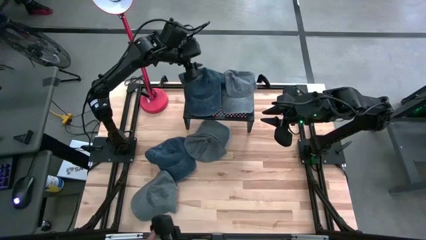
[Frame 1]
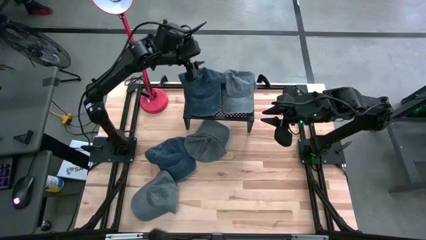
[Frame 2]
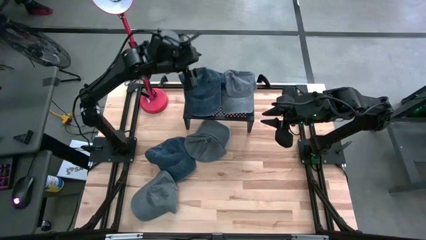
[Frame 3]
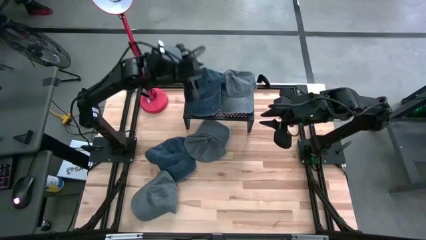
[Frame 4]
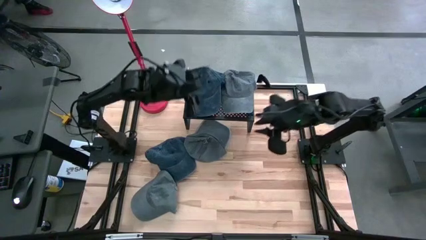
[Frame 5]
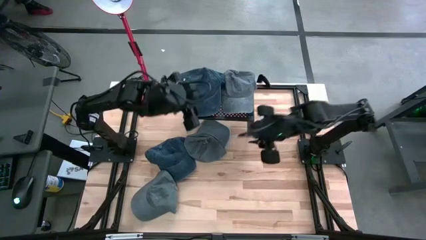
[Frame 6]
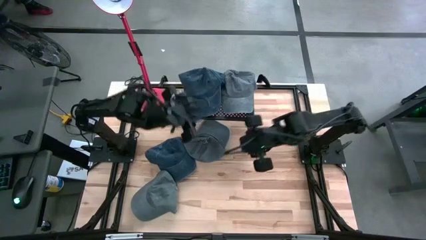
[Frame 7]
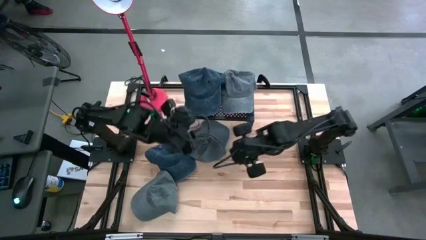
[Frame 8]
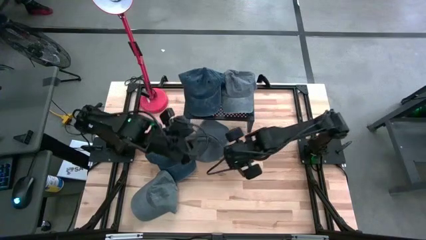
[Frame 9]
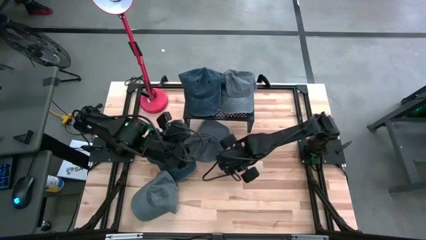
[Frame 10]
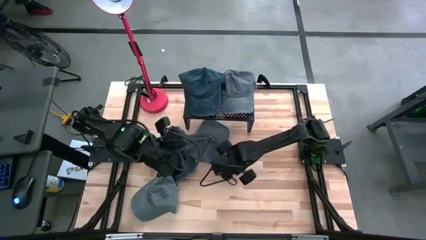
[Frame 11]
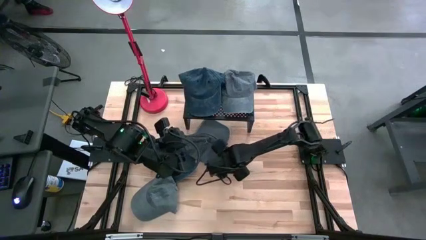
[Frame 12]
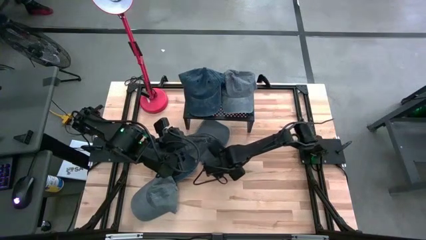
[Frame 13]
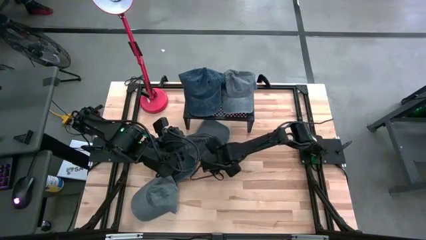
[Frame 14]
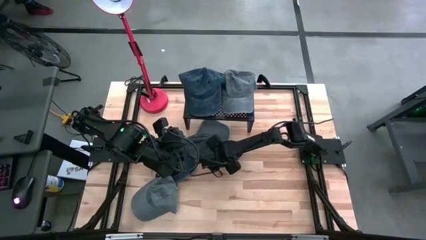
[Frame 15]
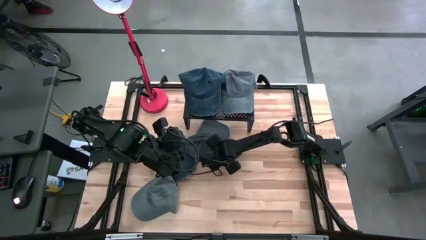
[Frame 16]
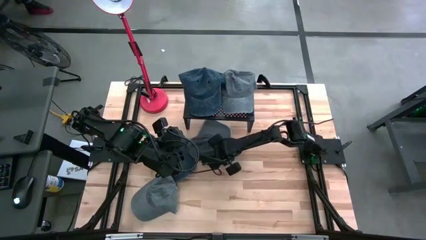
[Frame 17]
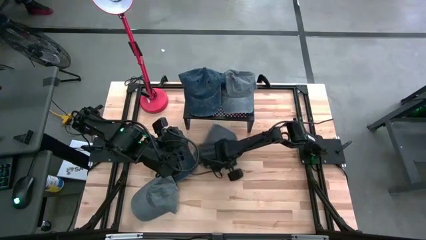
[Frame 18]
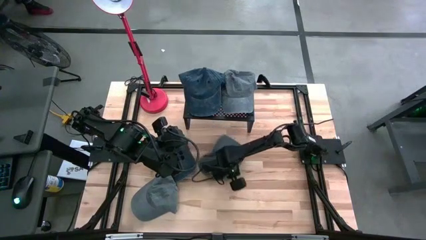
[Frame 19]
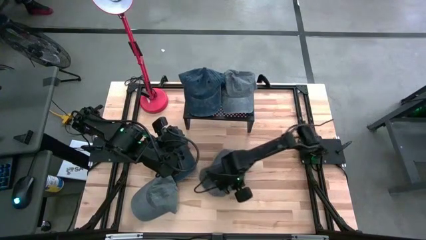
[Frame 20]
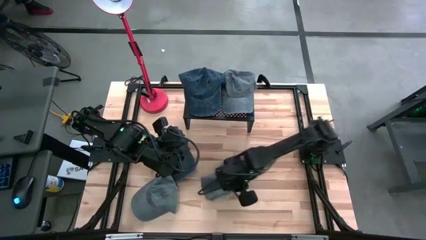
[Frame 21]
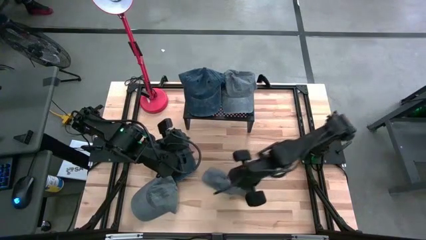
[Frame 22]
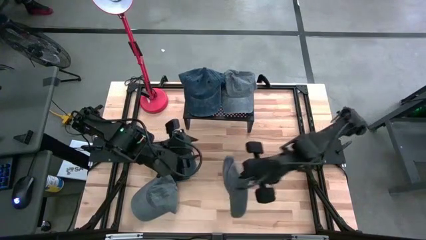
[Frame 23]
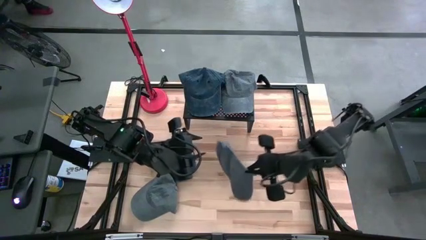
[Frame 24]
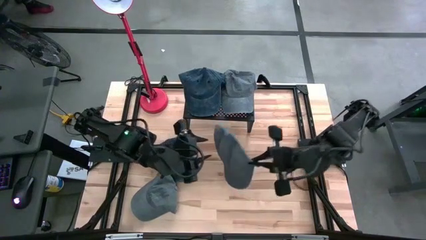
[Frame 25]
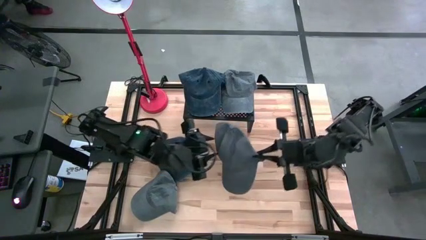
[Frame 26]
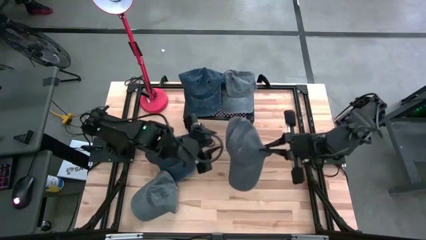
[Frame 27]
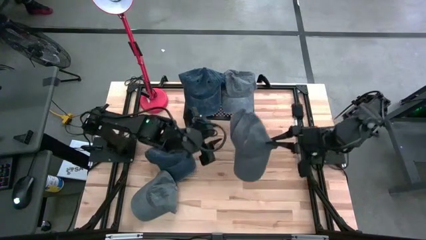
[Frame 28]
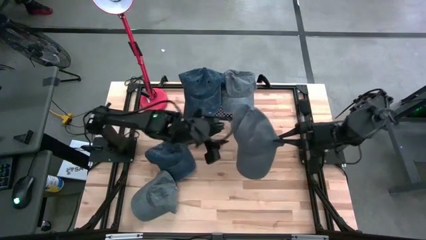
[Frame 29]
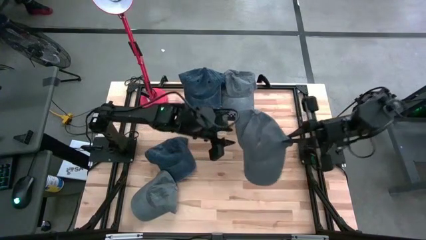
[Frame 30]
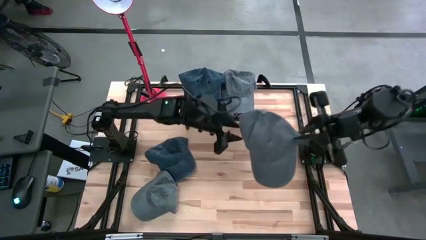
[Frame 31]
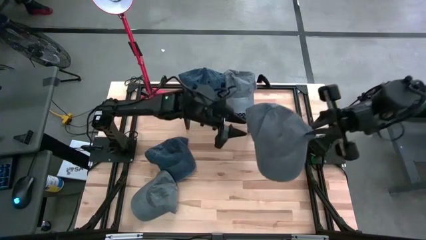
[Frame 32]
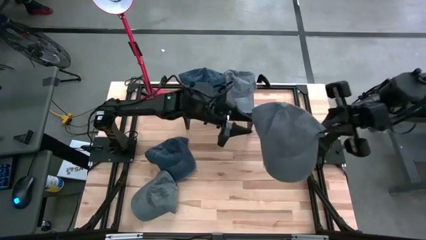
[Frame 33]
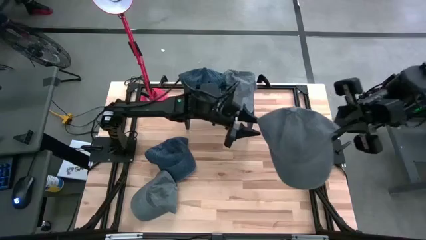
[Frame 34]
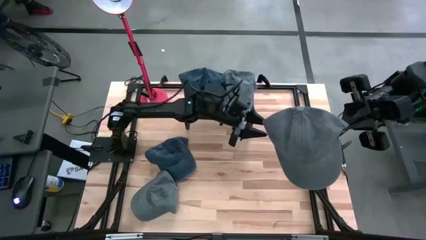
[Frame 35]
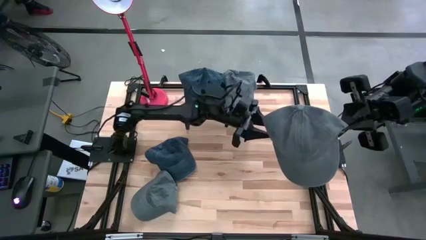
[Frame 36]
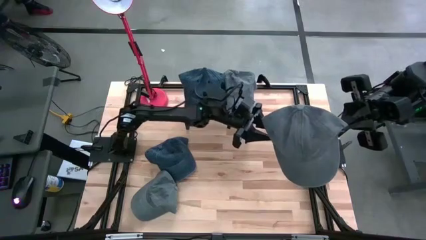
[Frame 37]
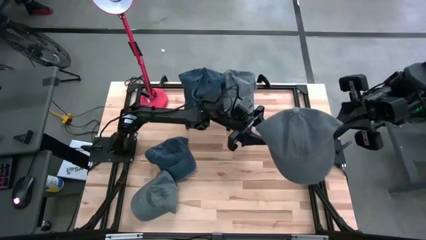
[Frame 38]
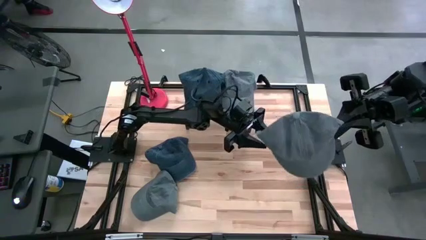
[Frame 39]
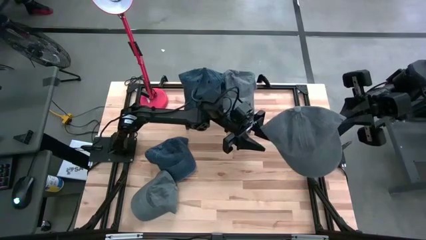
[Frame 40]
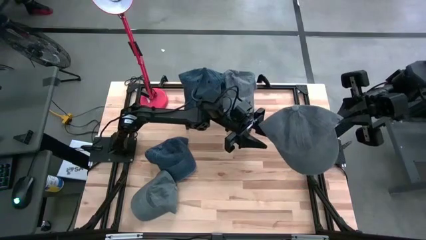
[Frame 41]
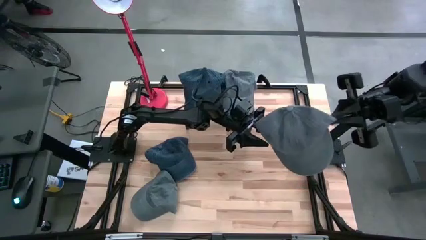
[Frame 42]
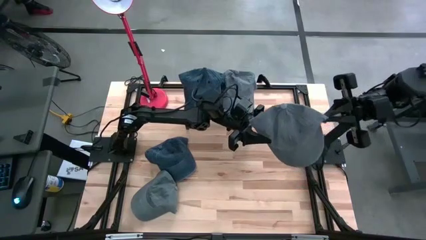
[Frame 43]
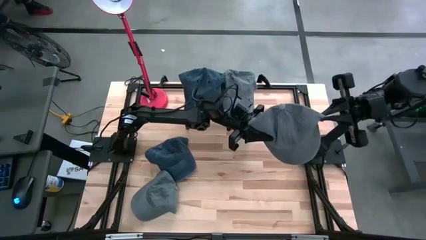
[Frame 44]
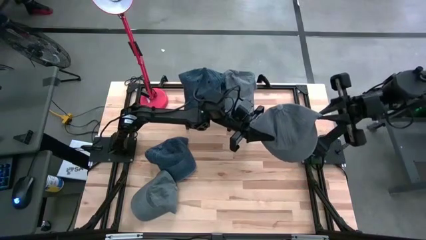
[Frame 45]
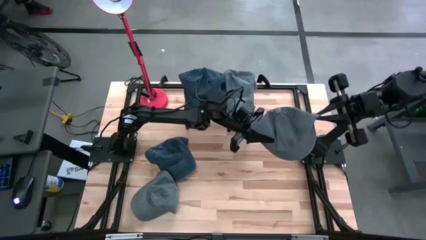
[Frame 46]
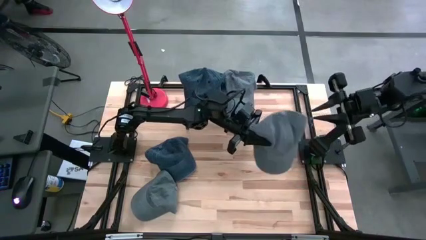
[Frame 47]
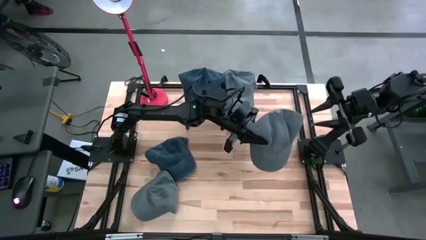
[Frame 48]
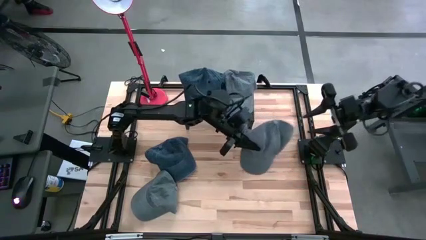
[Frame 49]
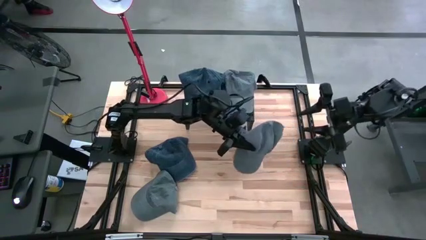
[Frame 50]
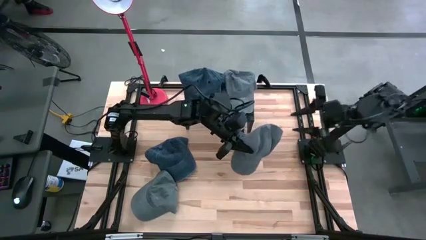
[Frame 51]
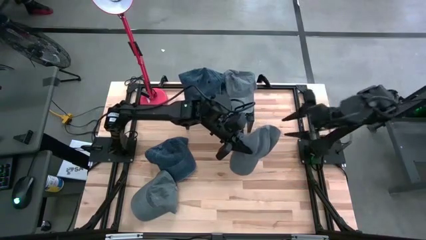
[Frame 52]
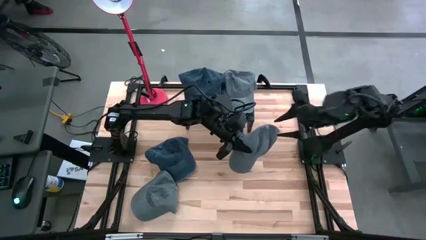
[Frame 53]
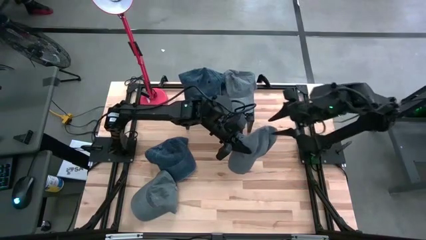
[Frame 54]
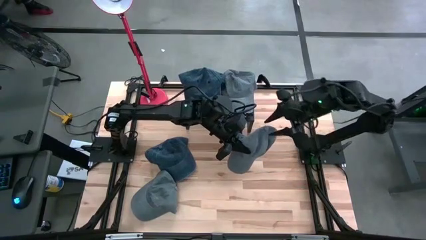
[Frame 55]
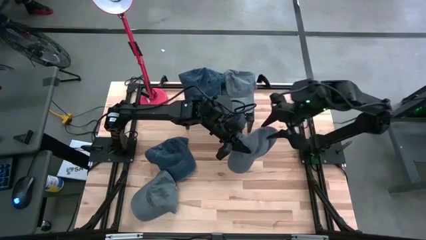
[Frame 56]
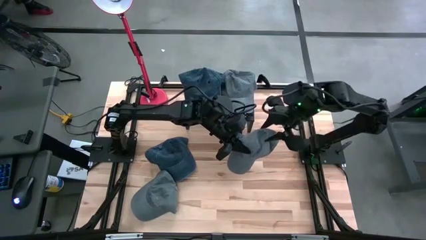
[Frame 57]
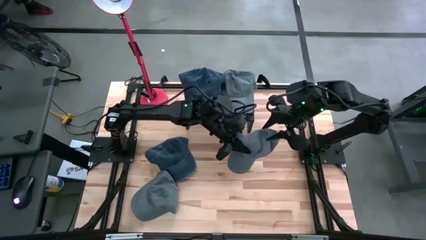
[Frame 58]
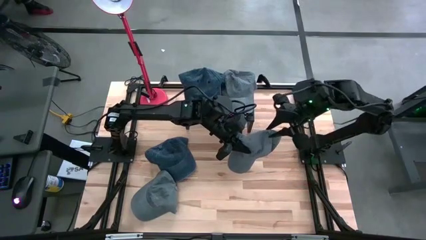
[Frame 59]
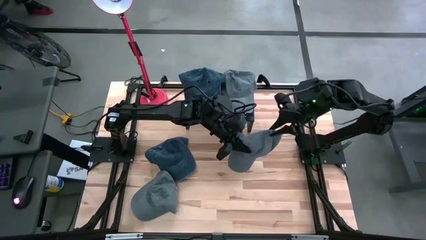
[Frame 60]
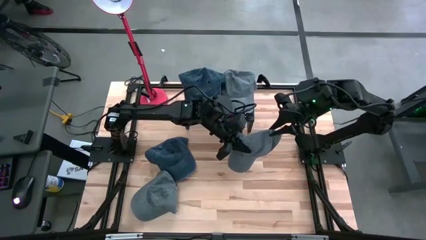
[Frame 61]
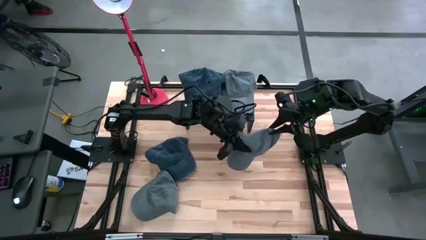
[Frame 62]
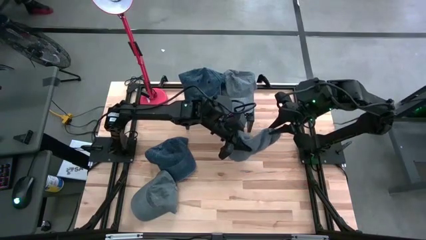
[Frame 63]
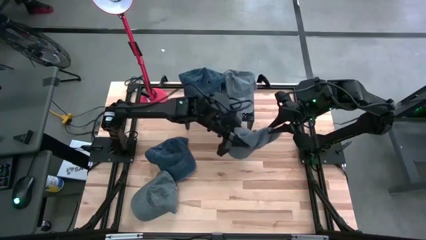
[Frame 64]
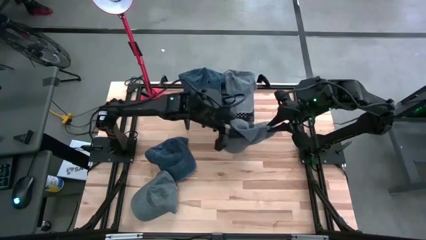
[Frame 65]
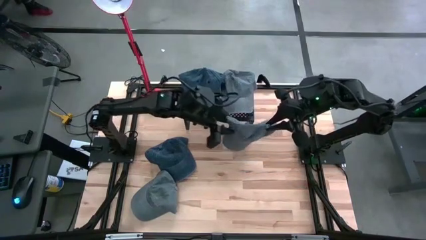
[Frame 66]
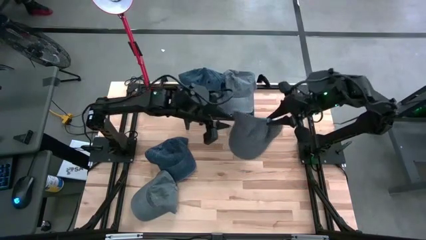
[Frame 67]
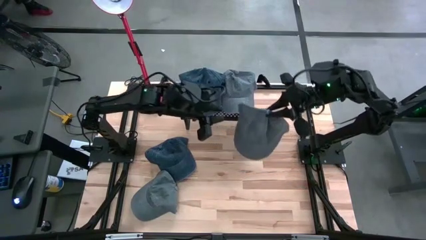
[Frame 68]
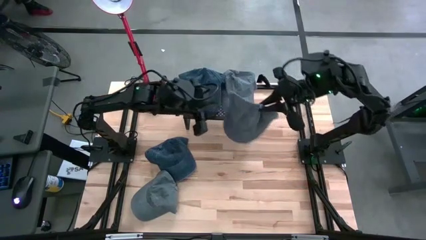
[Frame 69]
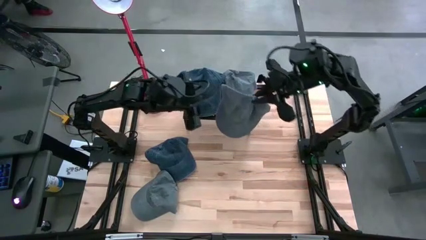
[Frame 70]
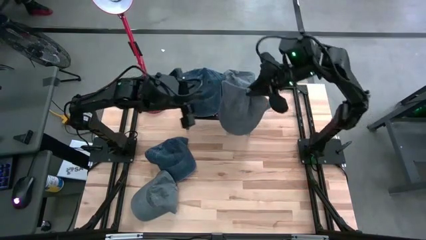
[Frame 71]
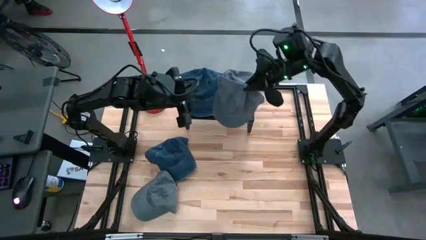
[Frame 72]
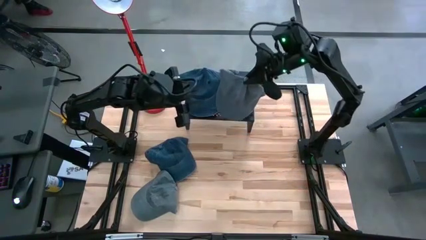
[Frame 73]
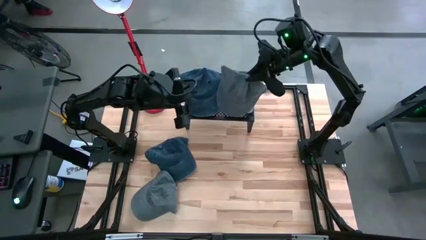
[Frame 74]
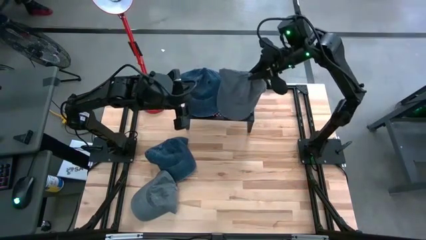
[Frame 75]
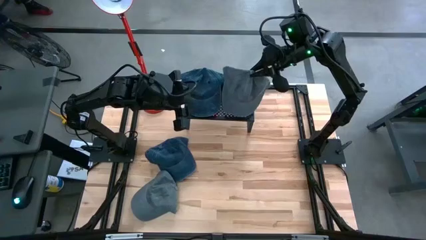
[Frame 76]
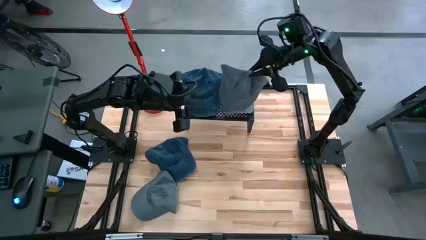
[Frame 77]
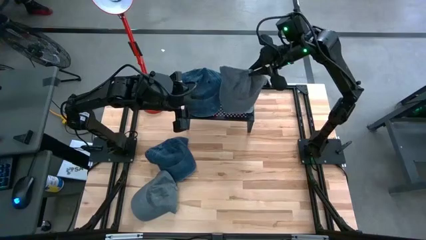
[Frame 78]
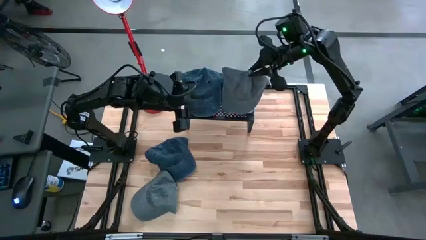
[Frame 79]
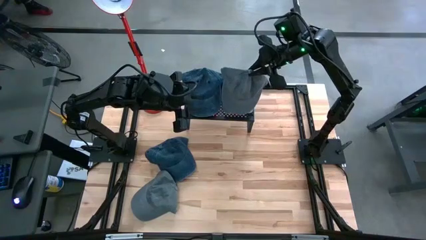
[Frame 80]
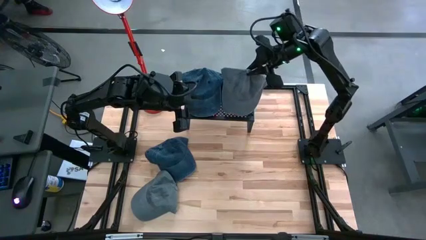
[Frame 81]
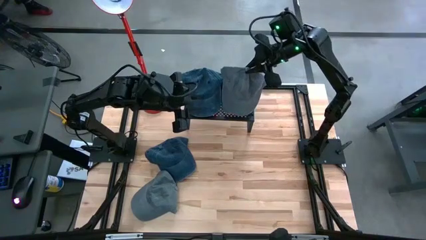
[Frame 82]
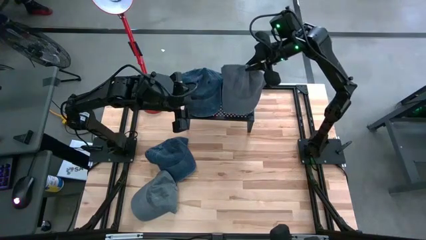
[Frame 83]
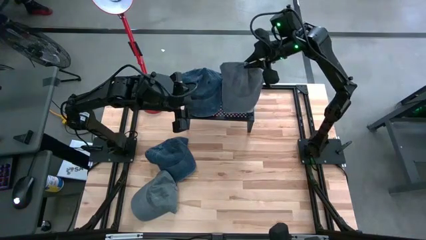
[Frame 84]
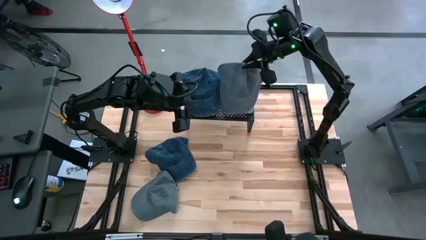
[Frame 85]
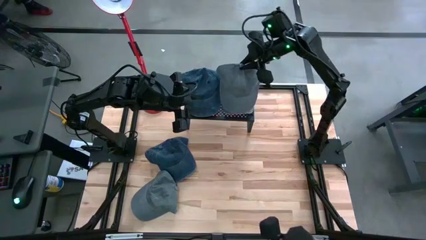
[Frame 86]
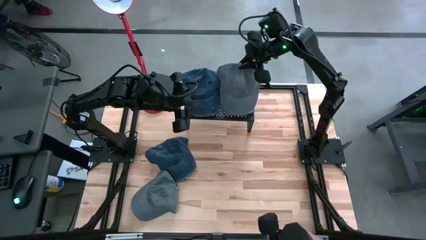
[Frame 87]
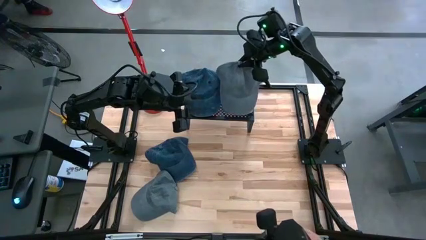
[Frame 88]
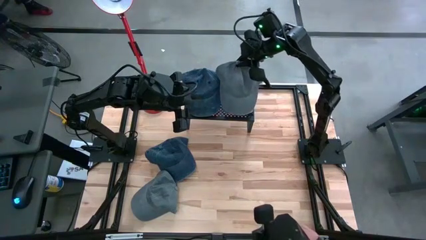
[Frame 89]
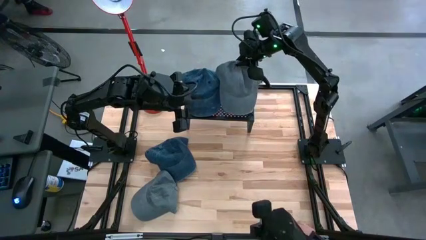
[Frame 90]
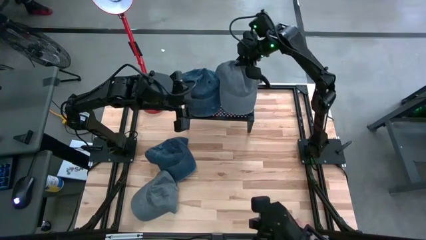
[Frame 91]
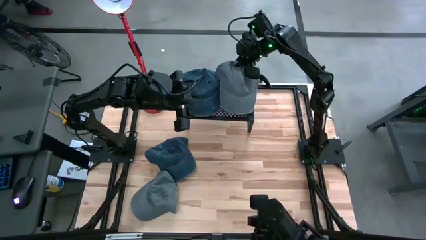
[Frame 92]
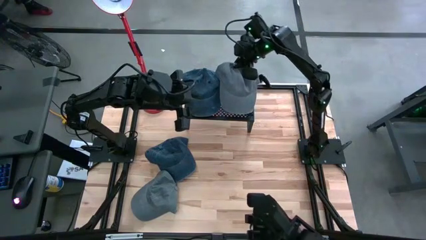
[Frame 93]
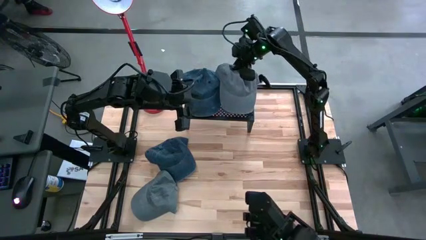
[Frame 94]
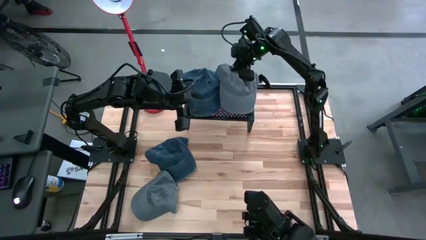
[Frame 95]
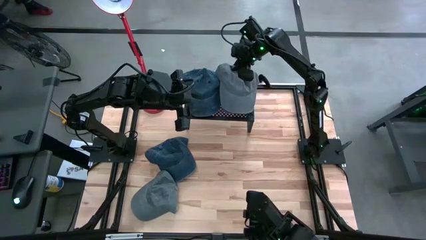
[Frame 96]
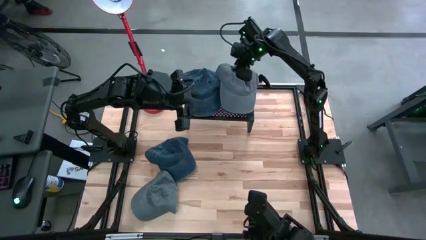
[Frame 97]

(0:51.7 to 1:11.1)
Task: Pick & Place hat
Stack the top gray cap on top of the gray cap on the shelf
